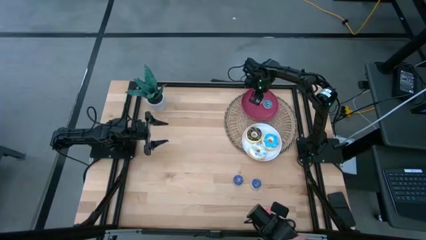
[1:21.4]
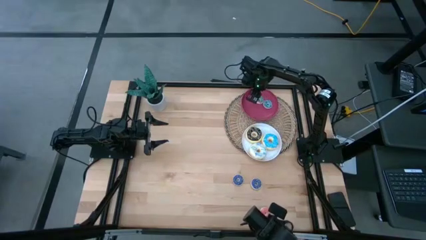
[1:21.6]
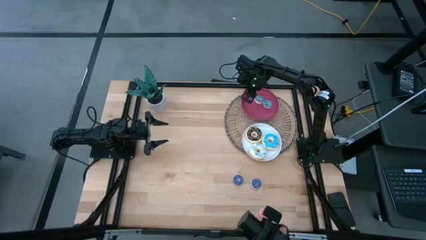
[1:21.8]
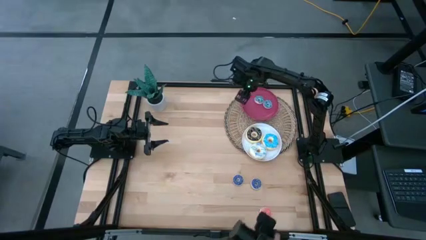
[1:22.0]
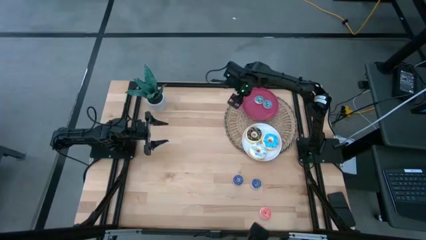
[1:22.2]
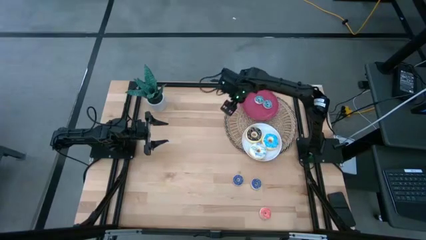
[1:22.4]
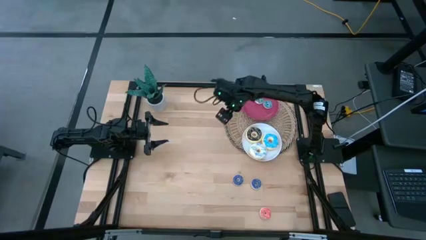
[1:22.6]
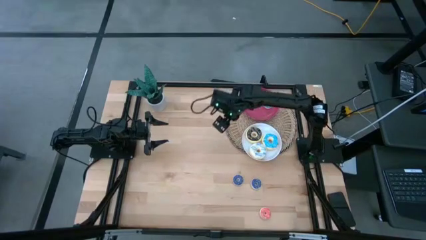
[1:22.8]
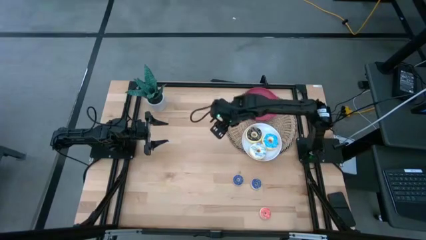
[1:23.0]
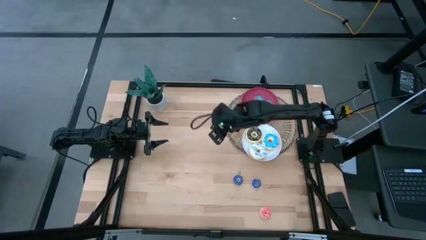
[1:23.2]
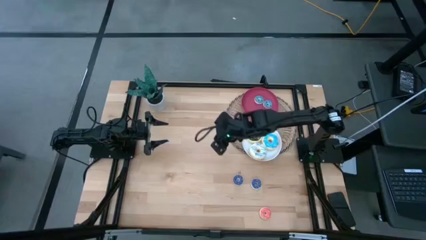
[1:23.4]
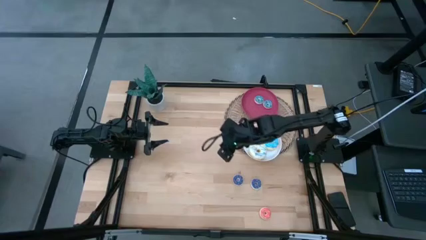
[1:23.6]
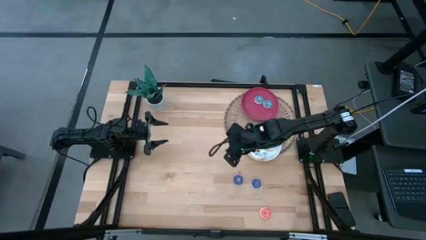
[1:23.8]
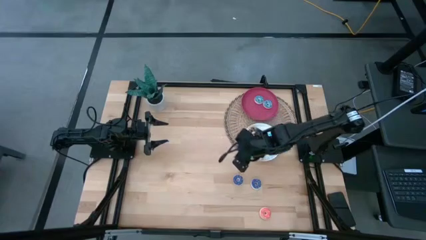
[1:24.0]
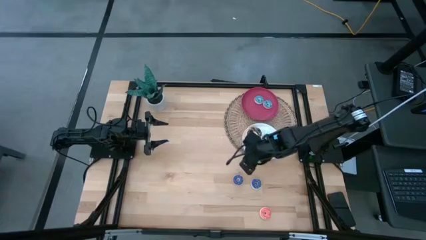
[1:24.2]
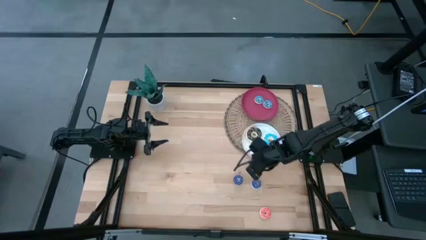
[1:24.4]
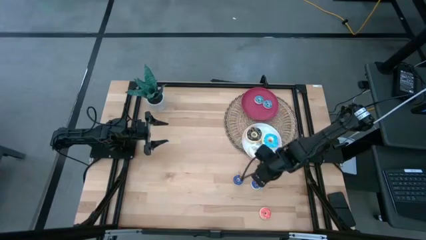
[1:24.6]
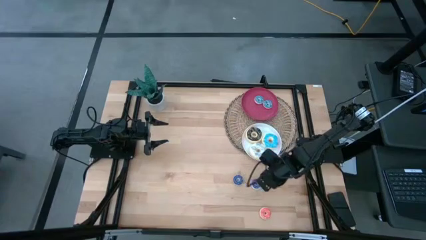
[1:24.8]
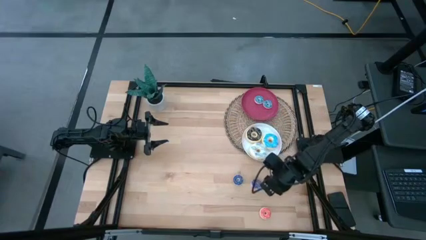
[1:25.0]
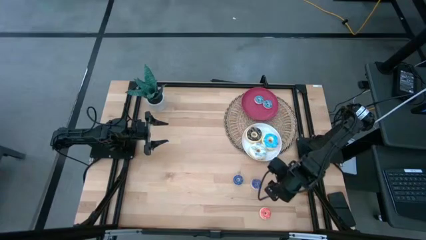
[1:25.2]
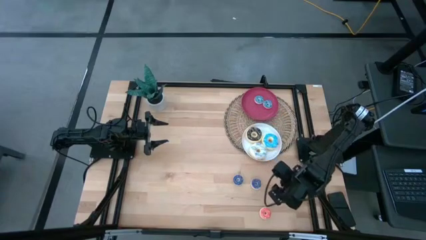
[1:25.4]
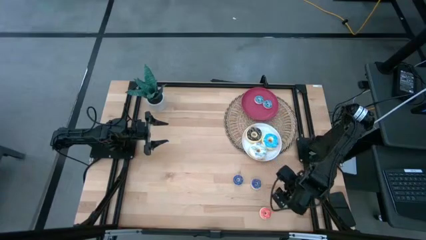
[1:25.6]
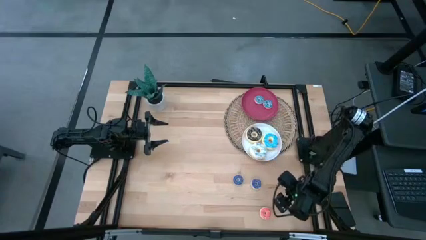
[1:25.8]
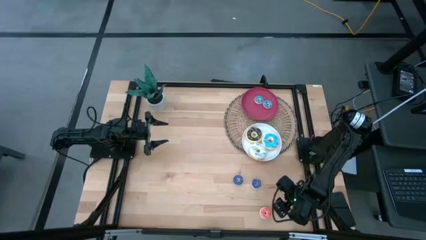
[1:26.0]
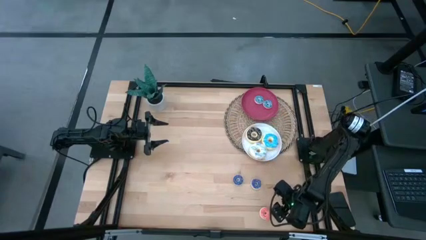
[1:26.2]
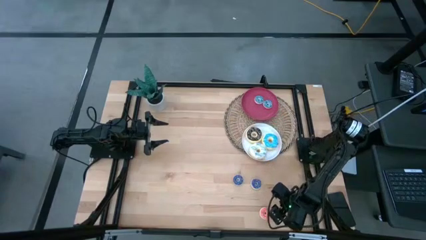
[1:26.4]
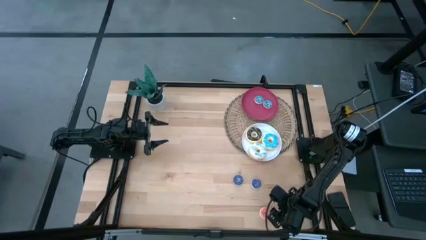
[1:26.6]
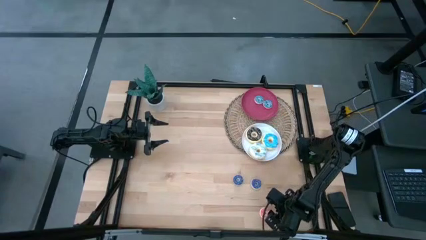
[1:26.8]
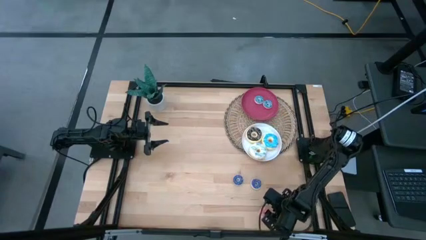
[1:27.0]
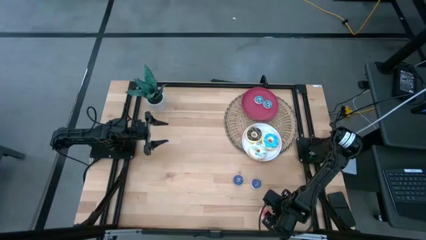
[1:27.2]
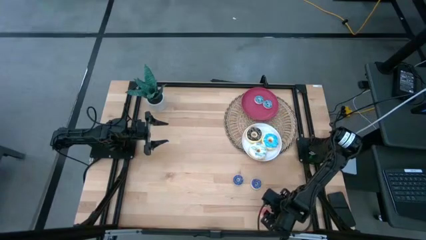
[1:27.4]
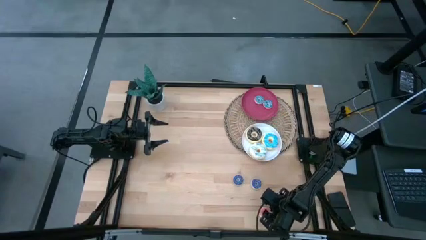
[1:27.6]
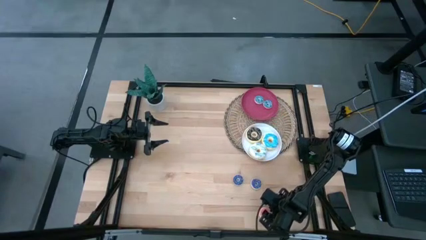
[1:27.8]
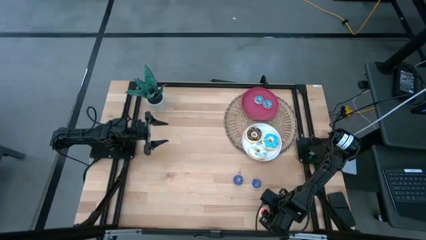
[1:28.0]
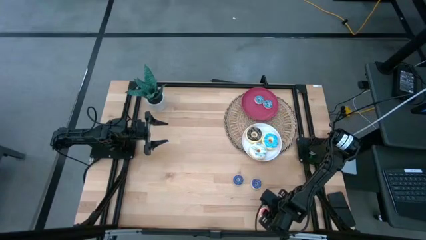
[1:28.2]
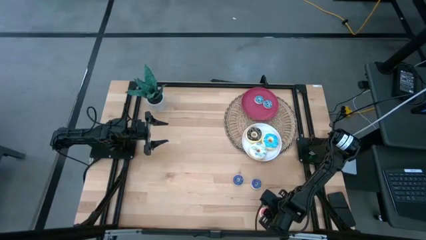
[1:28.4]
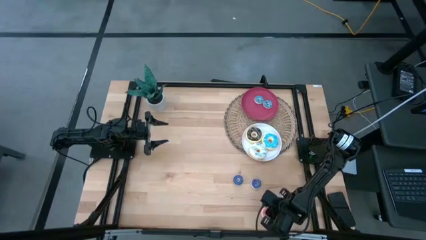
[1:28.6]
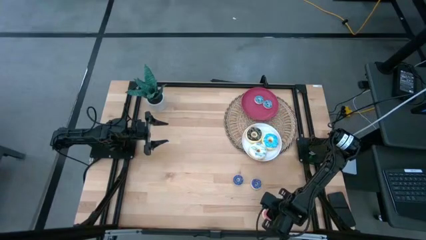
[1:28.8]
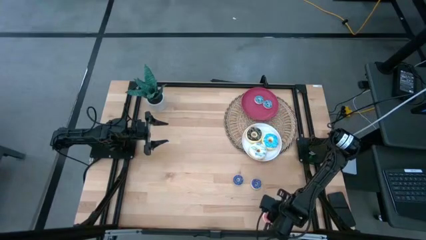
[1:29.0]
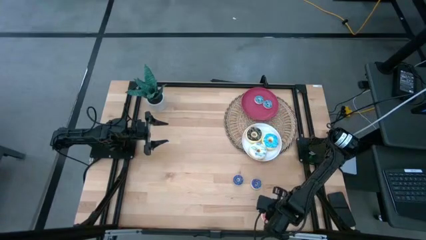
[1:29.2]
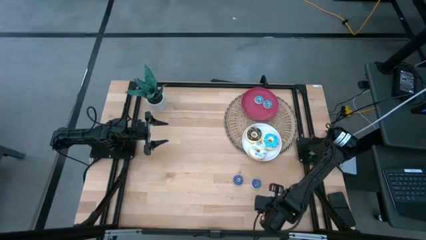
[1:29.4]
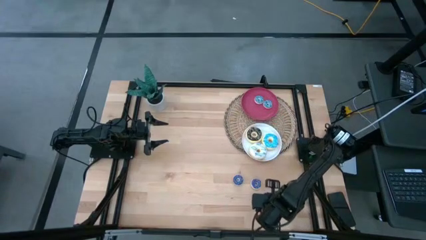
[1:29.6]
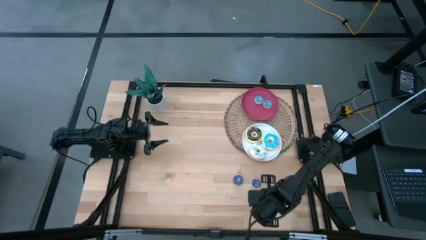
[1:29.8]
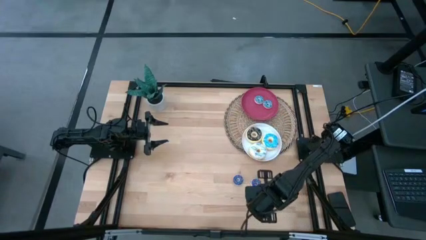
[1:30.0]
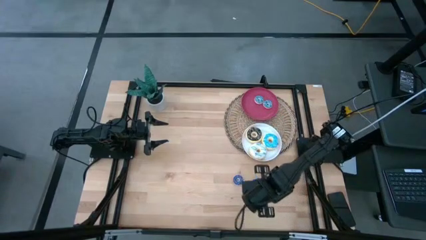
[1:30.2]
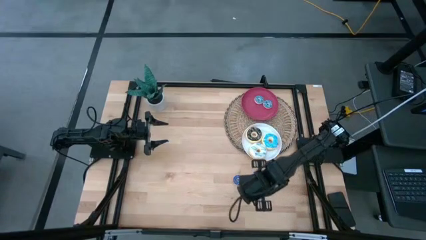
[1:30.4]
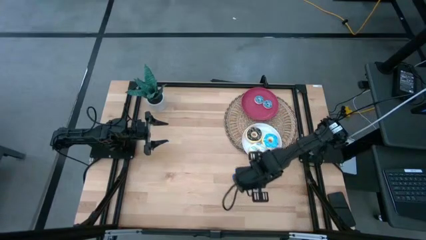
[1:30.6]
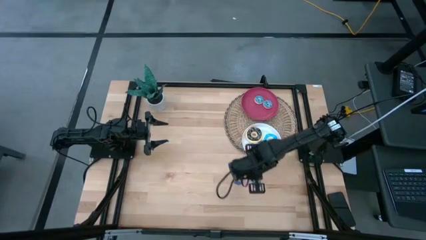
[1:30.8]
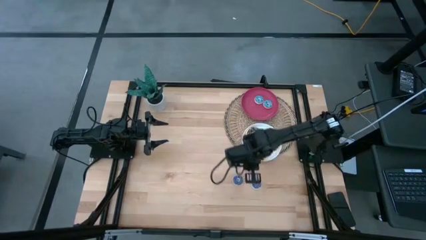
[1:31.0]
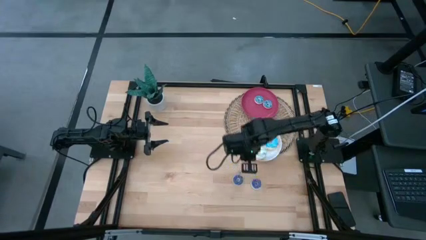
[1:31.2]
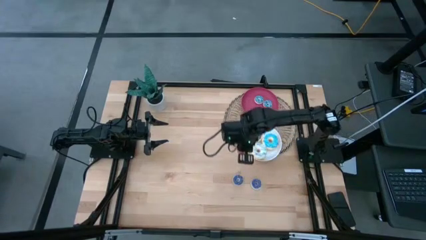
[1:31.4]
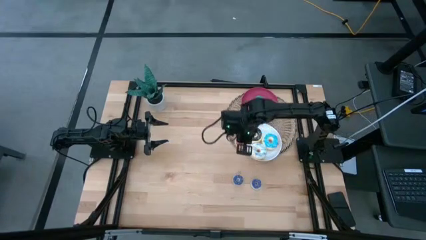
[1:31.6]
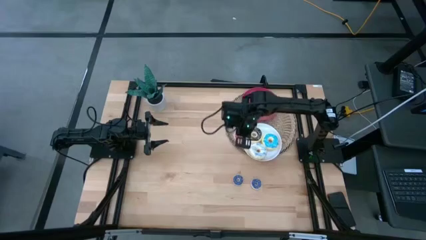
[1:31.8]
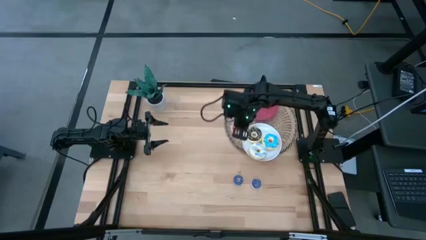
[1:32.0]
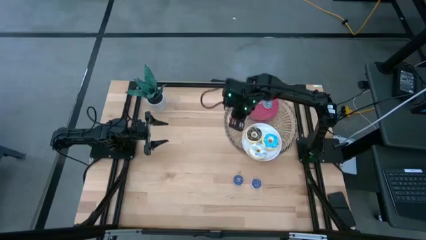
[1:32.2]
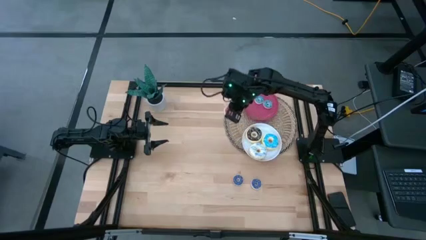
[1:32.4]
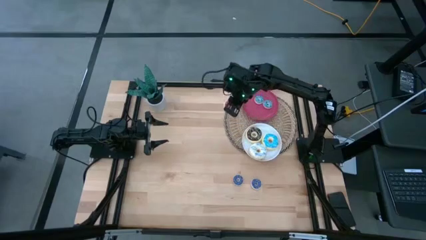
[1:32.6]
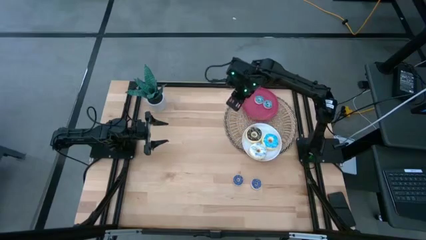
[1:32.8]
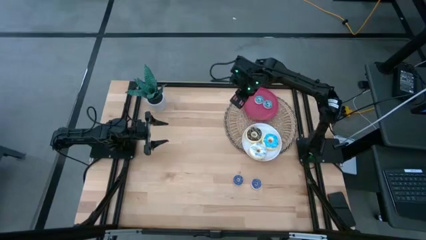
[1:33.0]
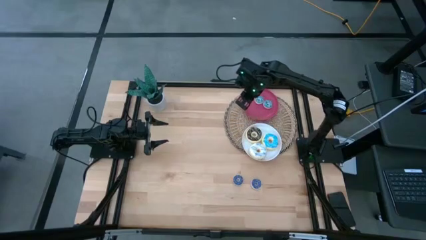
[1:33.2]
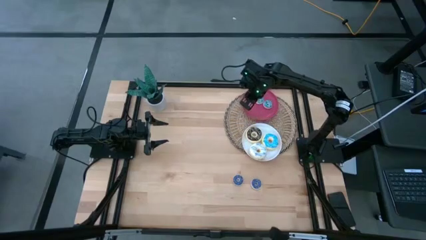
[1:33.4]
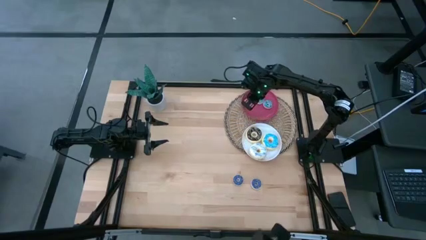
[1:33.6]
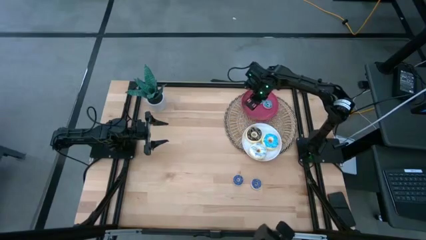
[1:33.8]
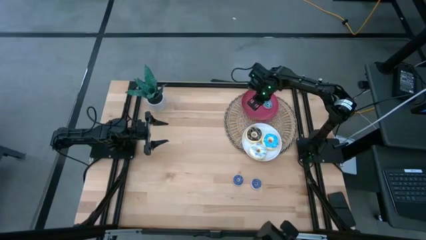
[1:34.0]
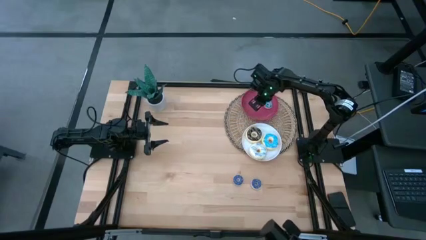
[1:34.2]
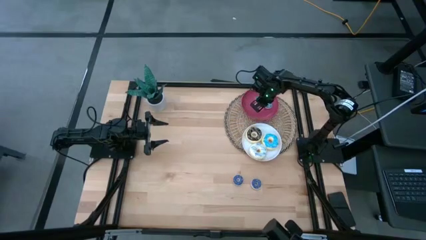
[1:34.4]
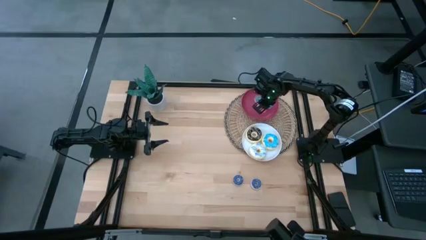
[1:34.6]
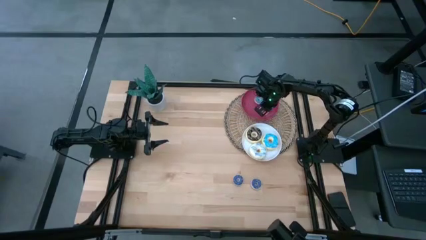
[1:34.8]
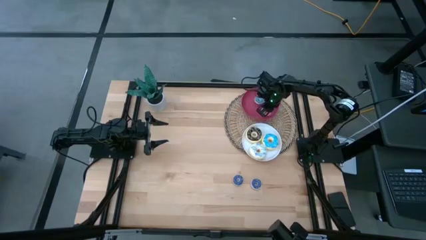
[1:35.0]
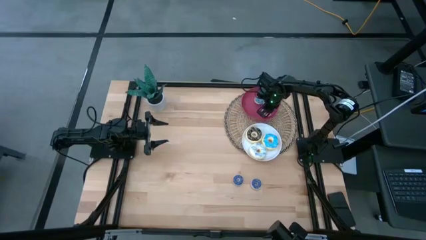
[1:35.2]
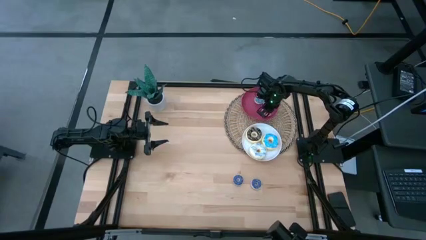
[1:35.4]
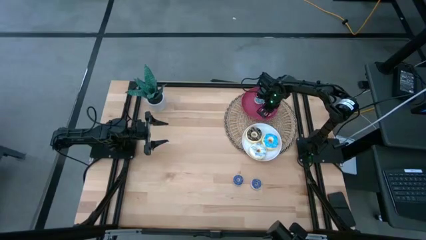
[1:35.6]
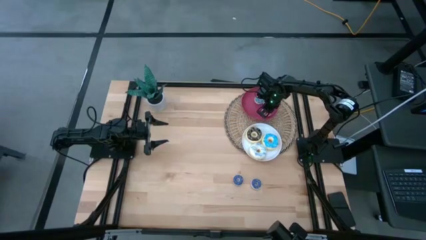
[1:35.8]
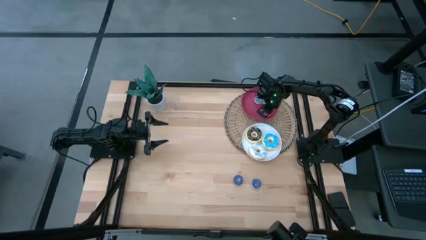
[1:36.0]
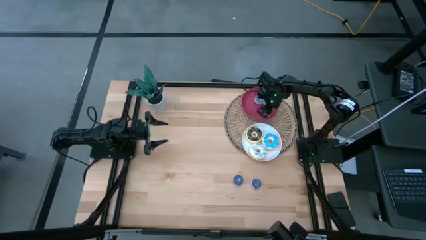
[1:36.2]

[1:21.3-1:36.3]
Task: Pick & Place donuts
Put the small pink donut on the red plate
